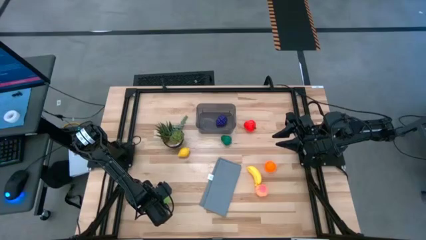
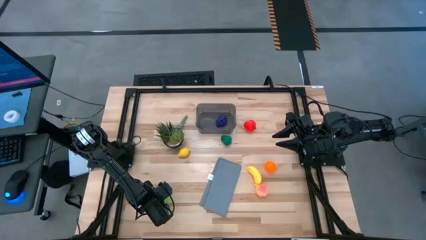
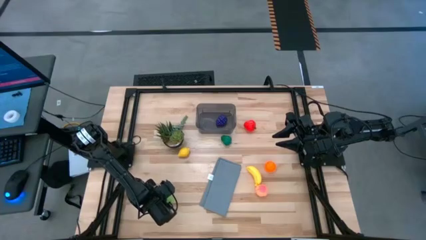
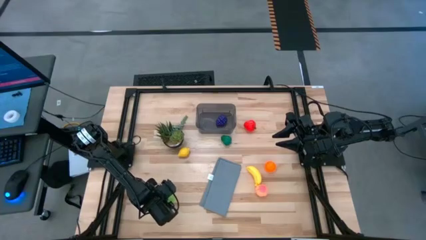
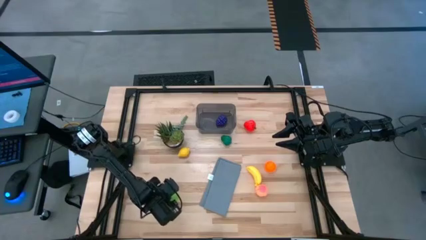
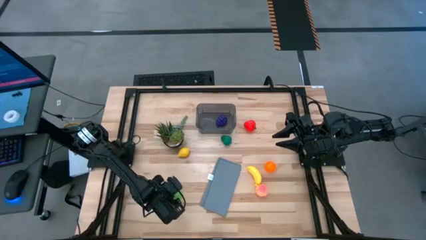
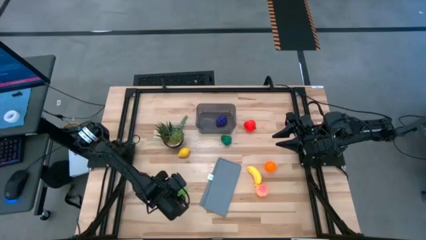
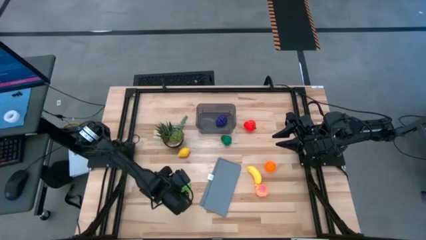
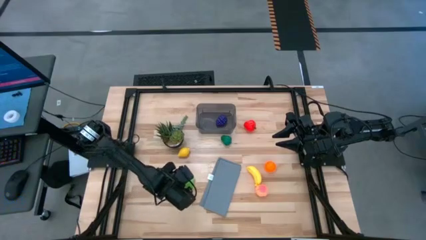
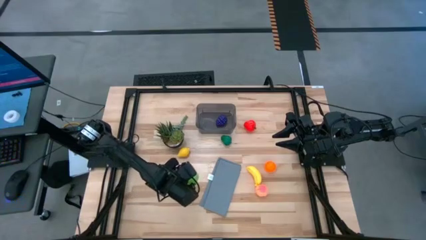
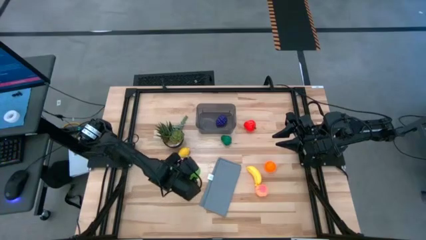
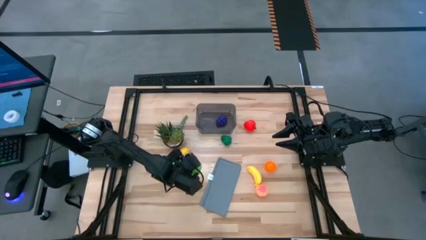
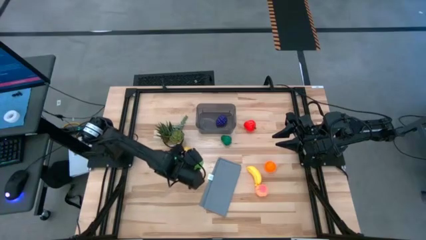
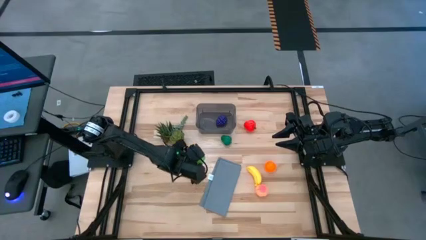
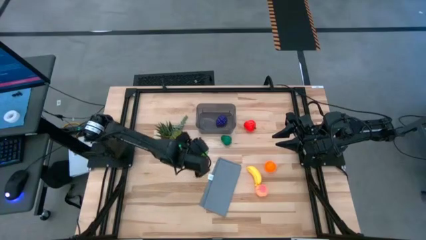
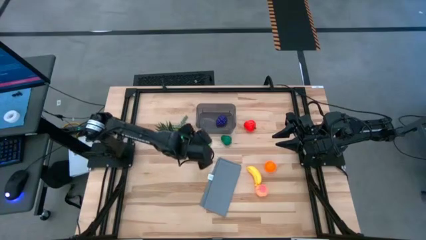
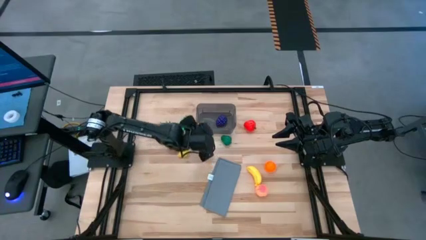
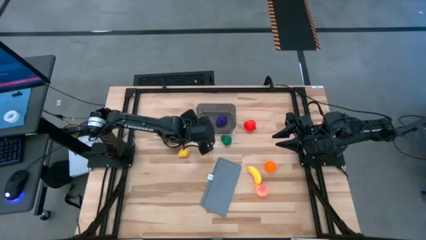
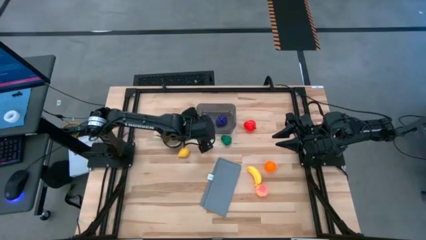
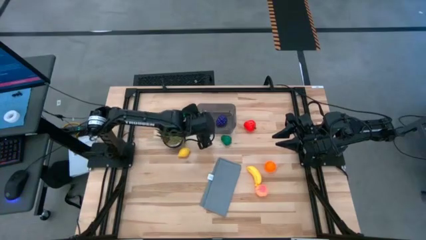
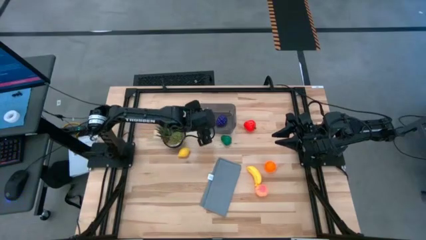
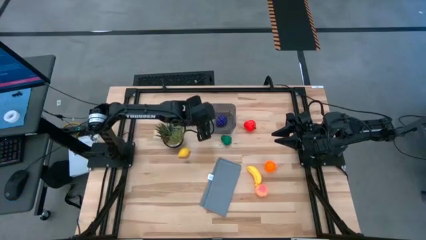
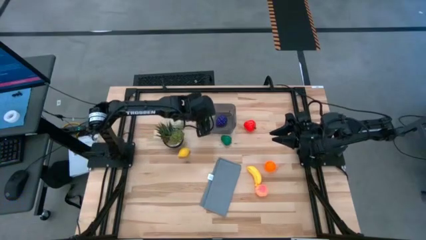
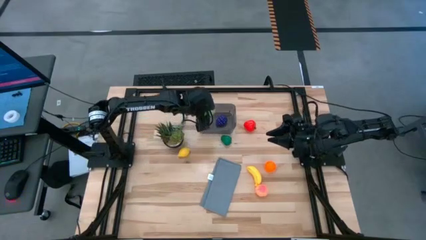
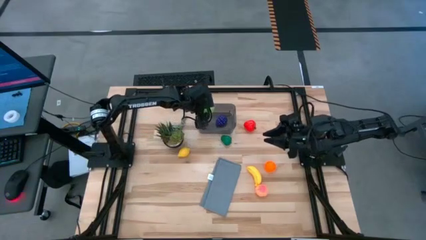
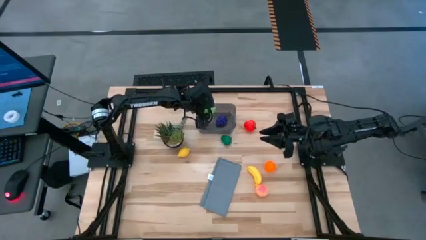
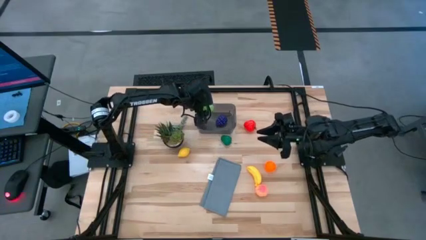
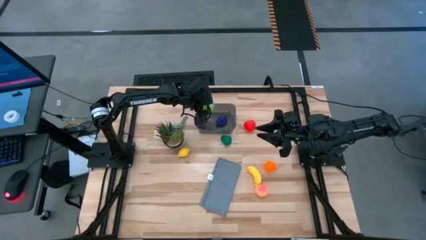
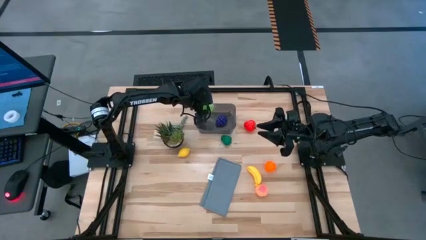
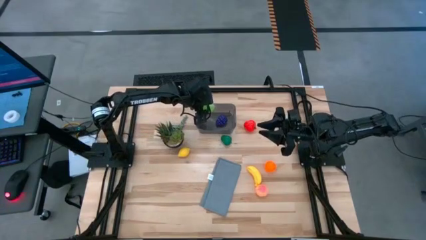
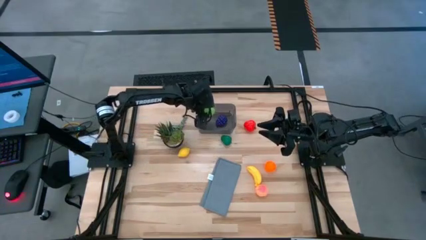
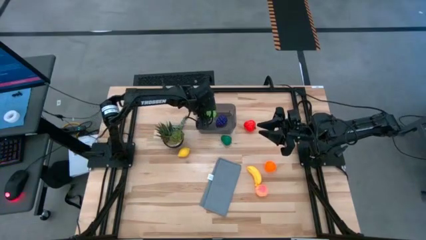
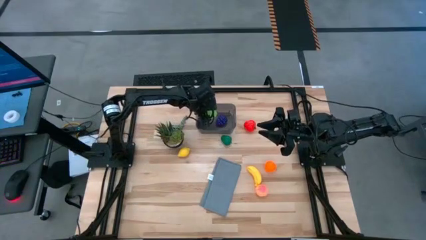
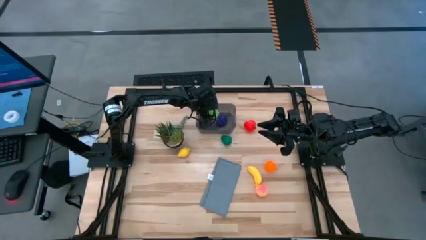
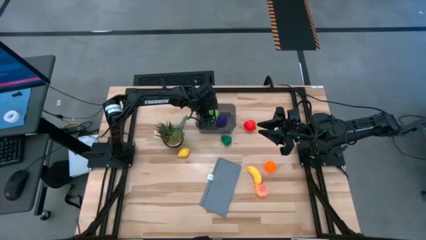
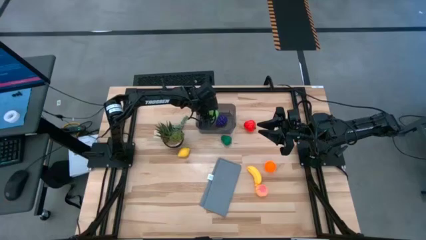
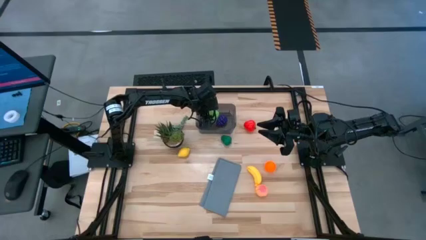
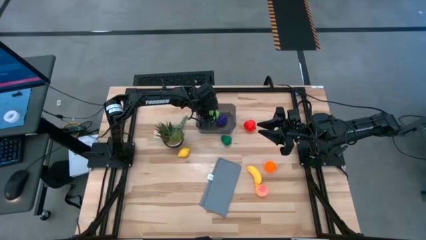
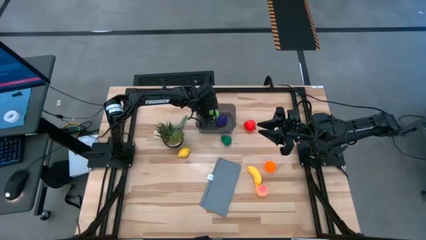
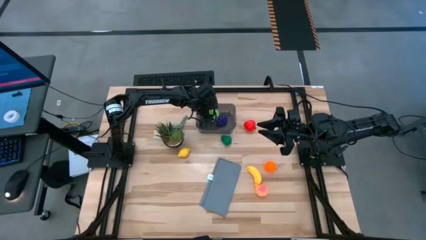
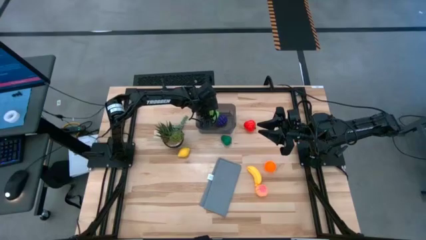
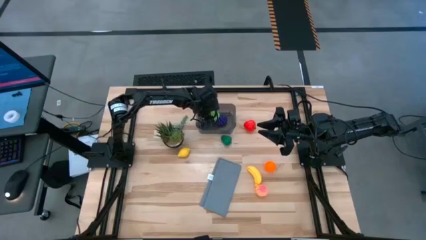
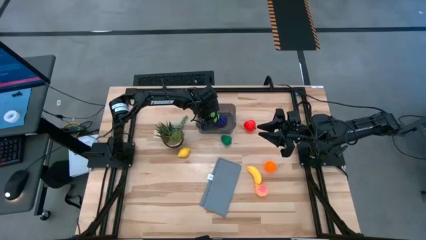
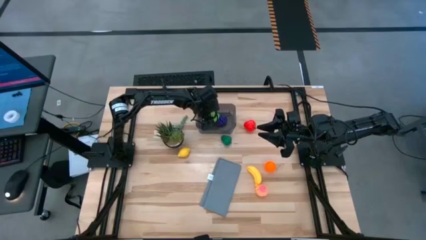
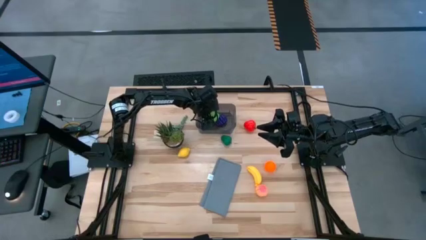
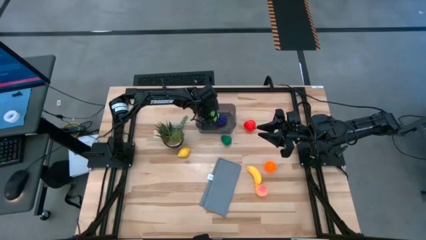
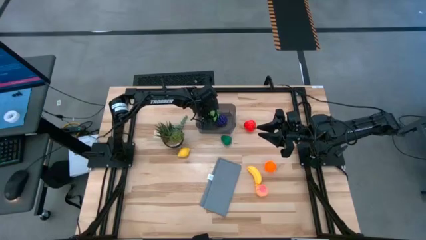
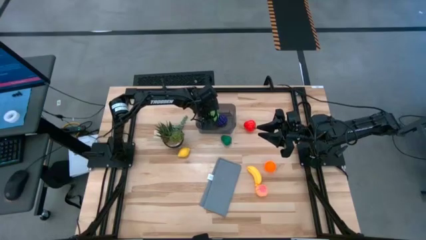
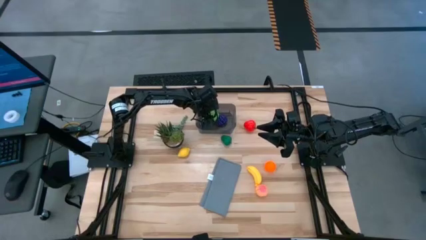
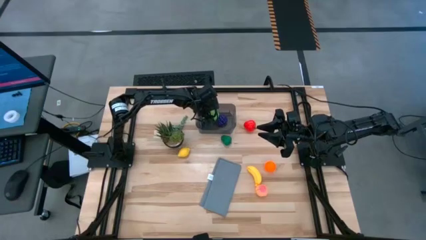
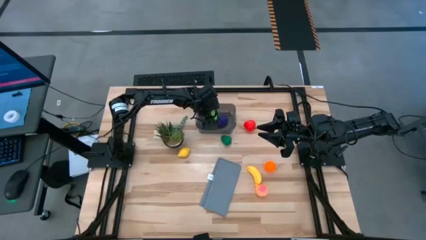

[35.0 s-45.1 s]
Task: Pick and placing Produce into tupperware
Put the melon into the black bin
